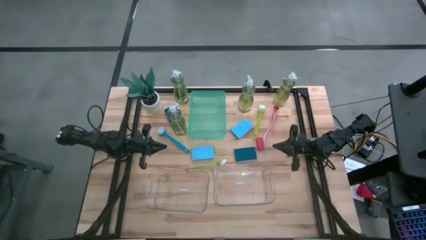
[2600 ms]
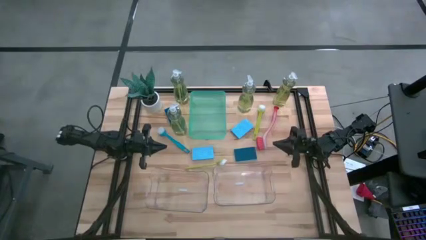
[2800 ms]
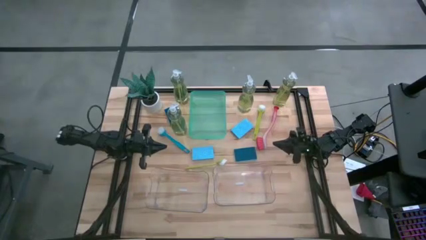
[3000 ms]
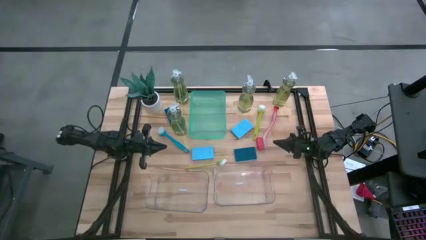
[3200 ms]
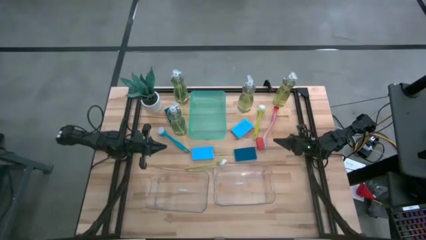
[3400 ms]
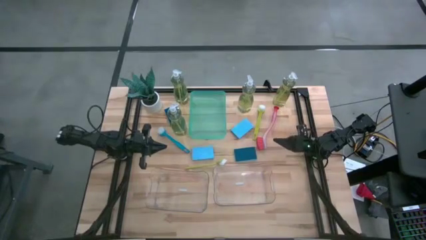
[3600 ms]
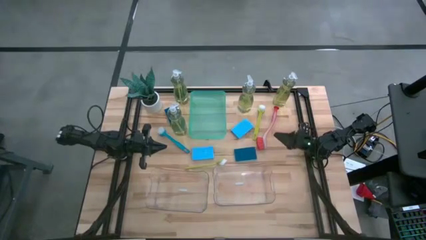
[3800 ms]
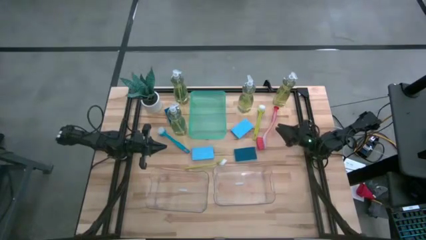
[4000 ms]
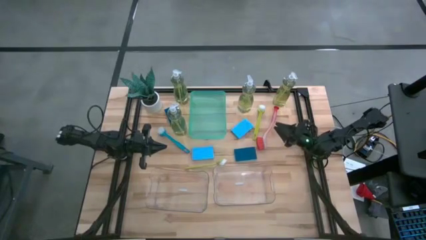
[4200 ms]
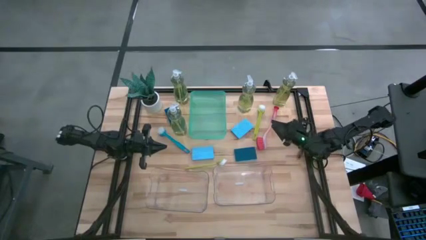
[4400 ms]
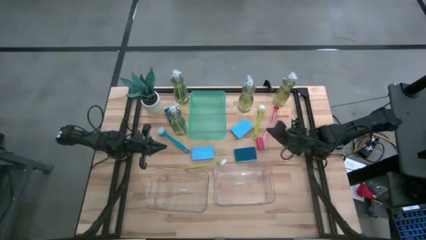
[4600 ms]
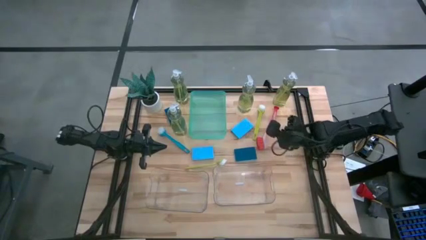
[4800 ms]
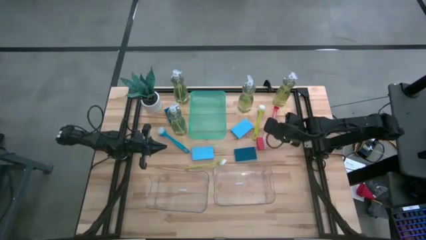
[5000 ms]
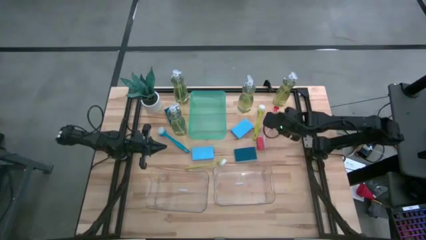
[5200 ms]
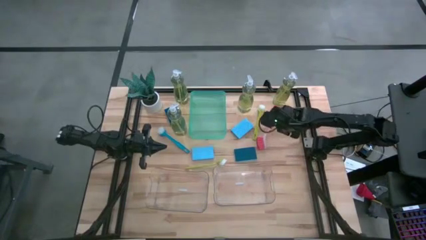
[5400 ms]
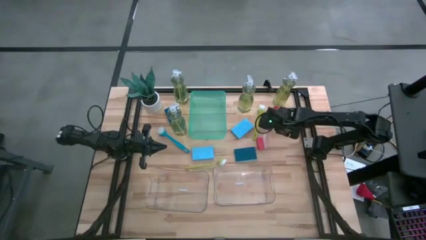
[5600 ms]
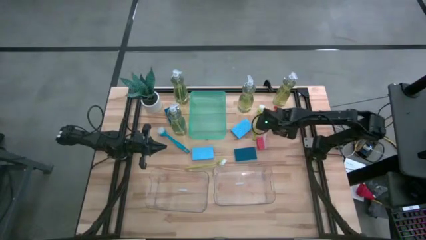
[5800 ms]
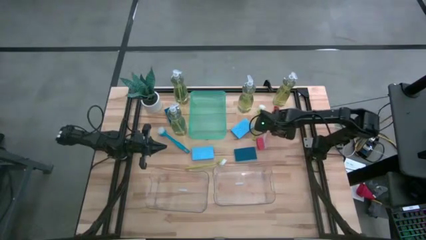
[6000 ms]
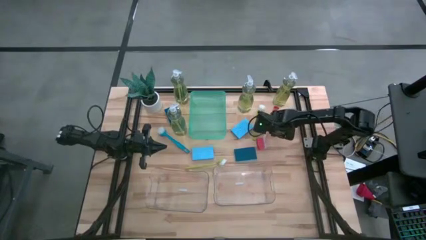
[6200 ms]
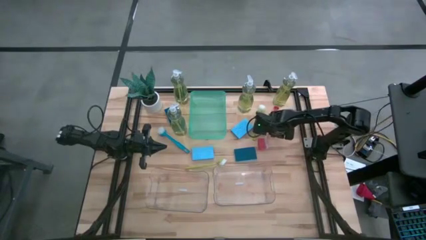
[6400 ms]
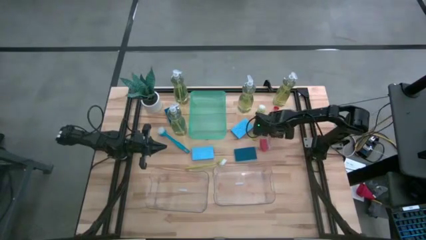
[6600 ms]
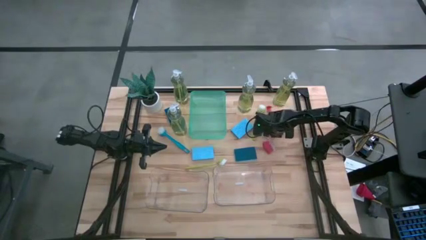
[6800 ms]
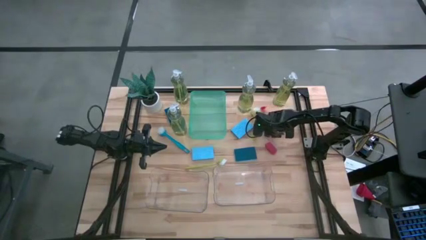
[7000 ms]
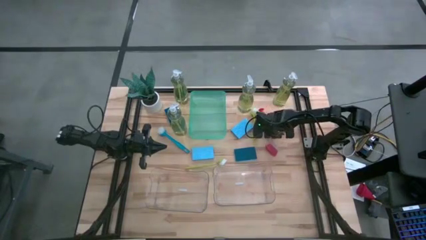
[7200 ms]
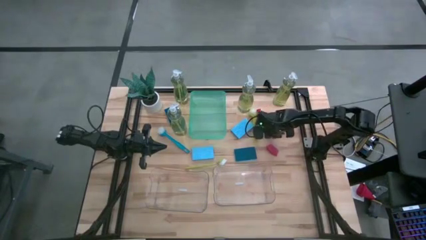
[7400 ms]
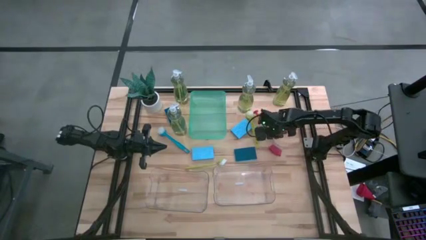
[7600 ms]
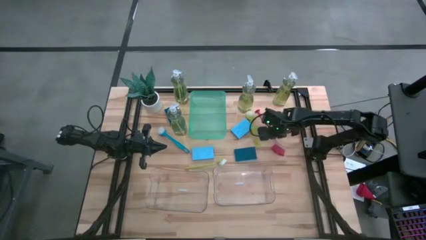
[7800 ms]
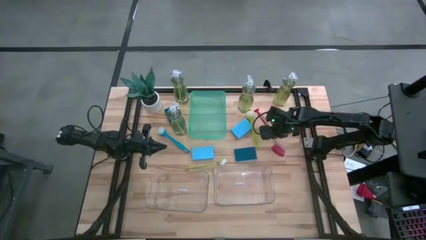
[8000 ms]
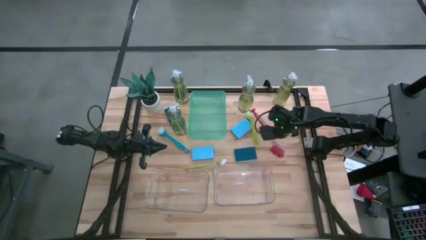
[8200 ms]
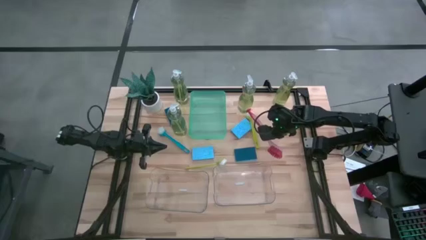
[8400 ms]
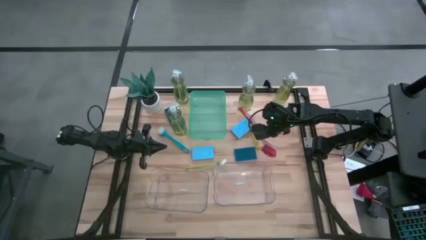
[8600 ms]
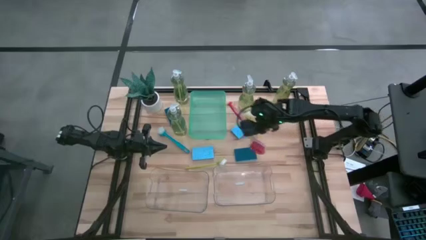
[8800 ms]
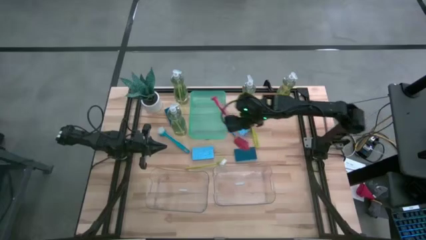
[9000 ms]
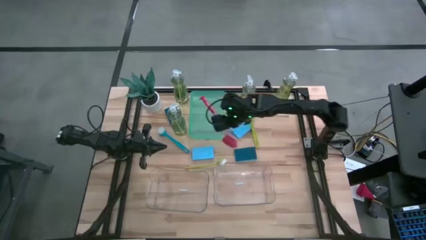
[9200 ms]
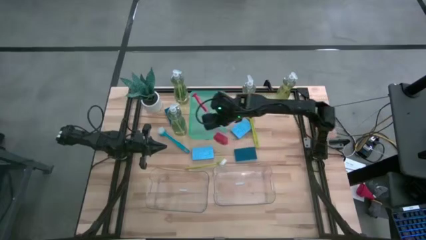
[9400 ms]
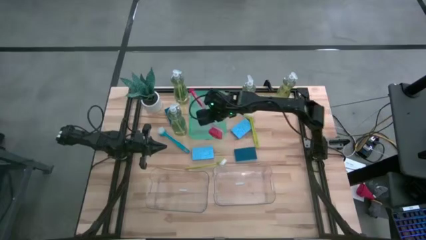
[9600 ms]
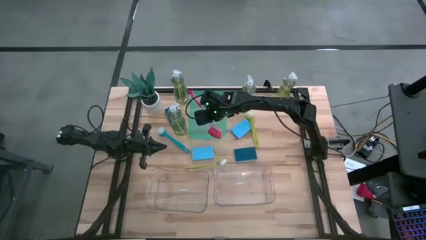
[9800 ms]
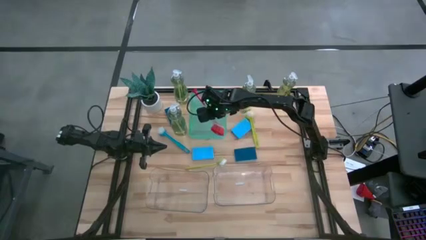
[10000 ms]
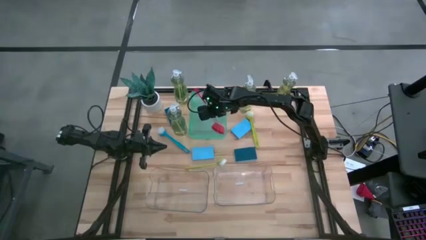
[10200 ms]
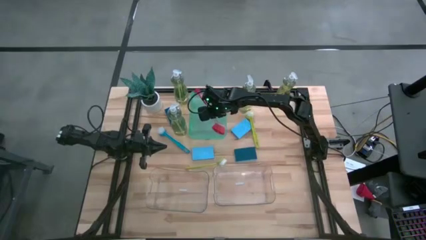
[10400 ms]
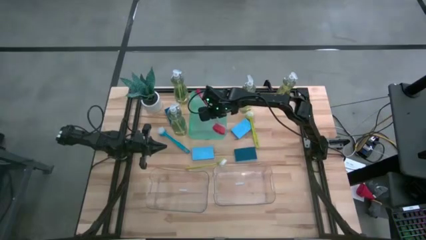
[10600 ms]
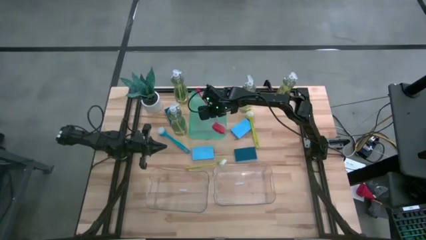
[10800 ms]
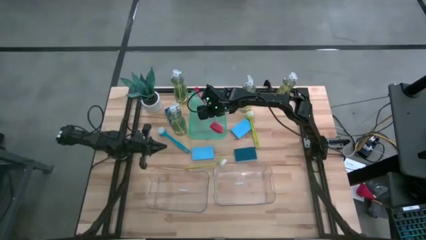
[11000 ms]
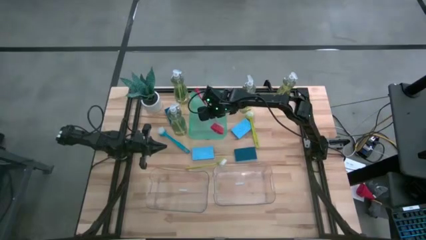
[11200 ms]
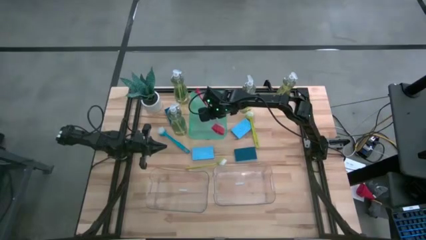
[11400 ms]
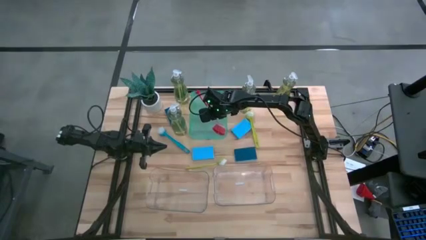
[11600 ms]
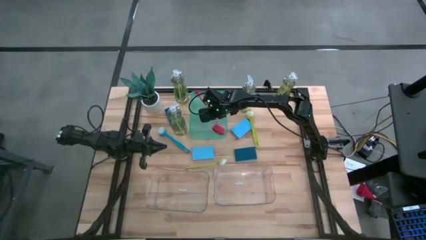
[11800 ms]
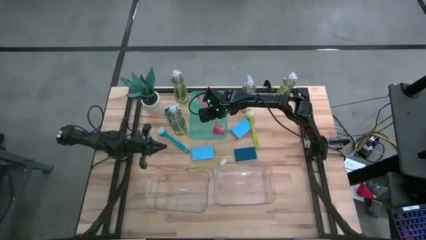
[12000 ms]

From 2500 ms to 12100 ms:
Task: Pick & Place Kitchen Sink Supplies
Put the red dish brush into the green bin

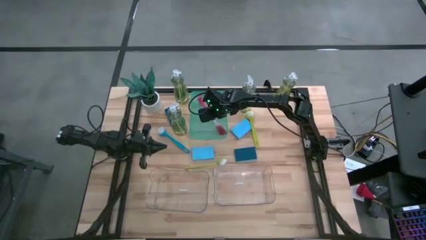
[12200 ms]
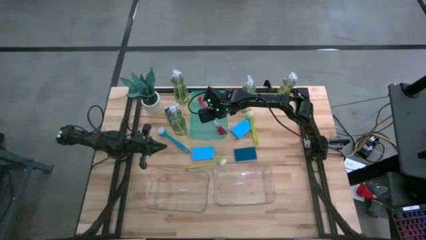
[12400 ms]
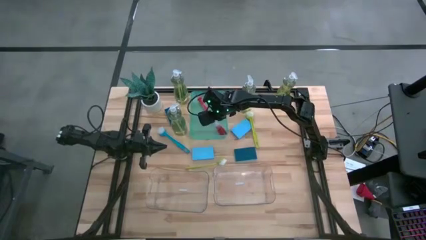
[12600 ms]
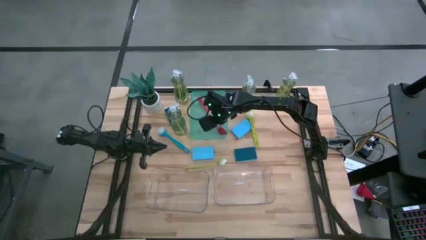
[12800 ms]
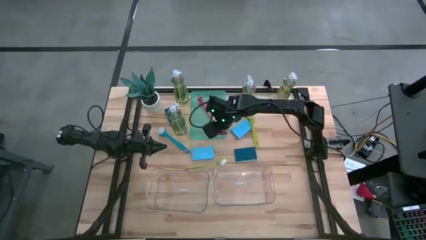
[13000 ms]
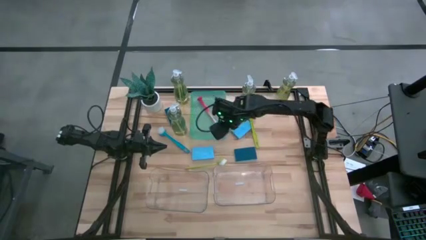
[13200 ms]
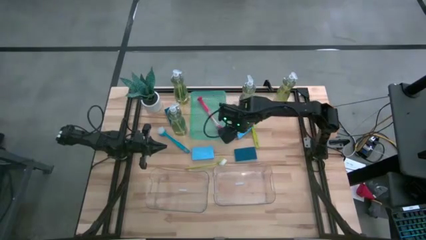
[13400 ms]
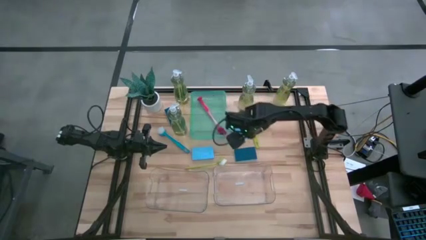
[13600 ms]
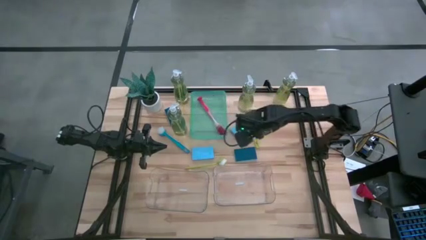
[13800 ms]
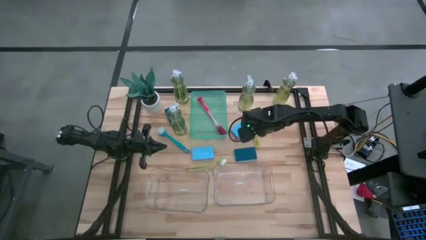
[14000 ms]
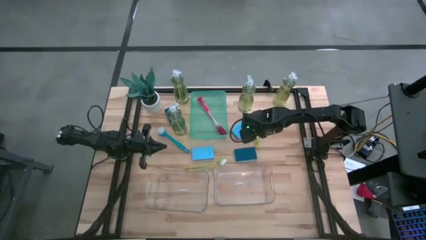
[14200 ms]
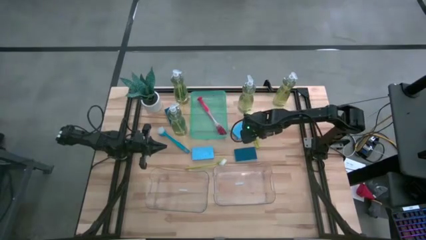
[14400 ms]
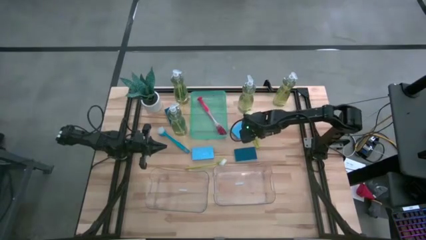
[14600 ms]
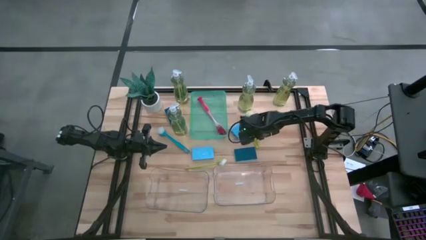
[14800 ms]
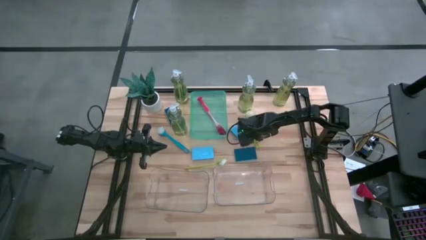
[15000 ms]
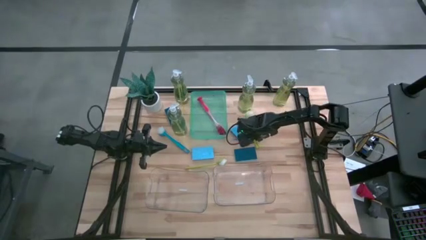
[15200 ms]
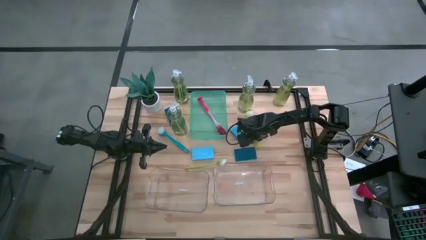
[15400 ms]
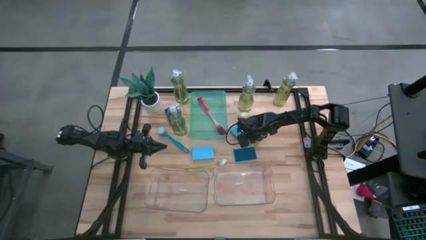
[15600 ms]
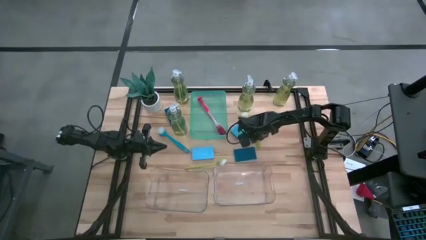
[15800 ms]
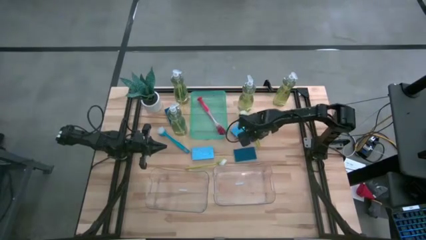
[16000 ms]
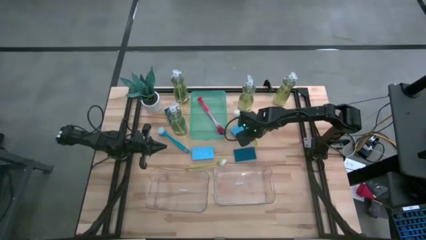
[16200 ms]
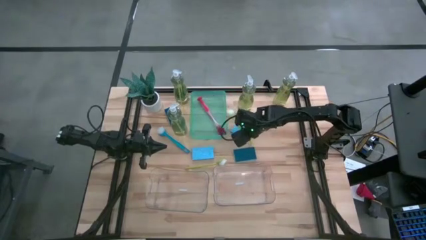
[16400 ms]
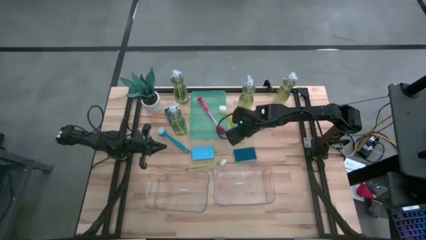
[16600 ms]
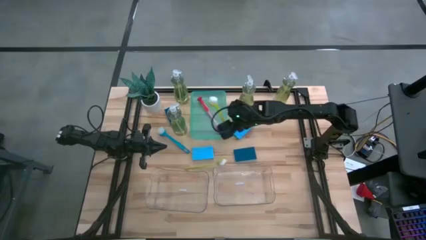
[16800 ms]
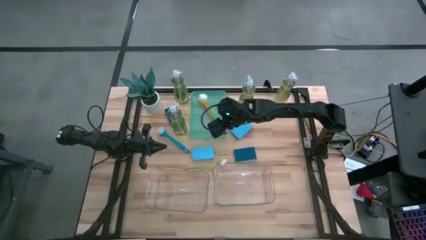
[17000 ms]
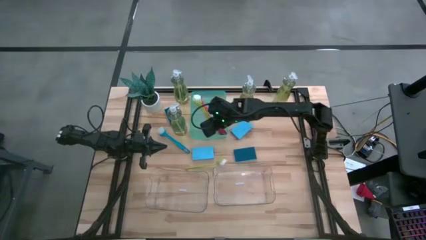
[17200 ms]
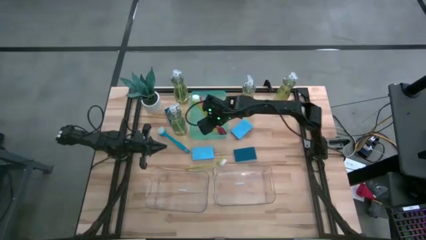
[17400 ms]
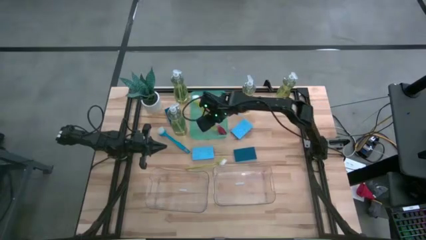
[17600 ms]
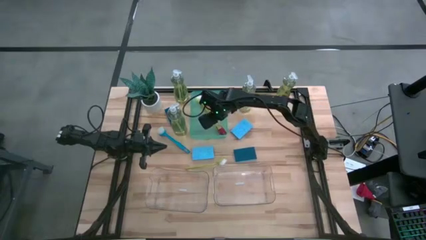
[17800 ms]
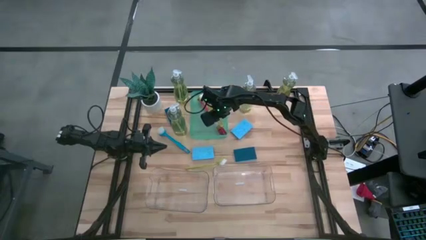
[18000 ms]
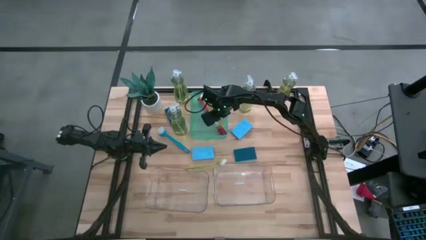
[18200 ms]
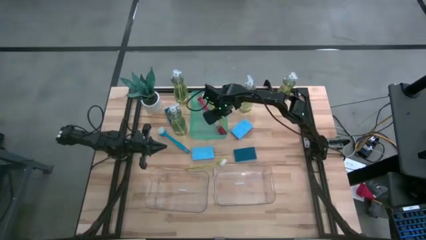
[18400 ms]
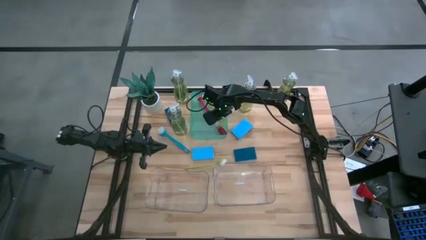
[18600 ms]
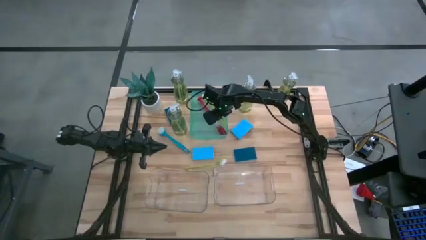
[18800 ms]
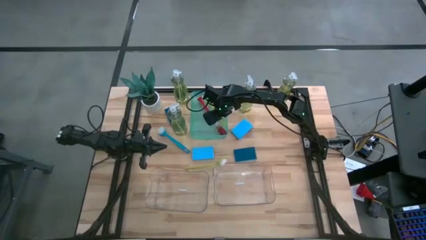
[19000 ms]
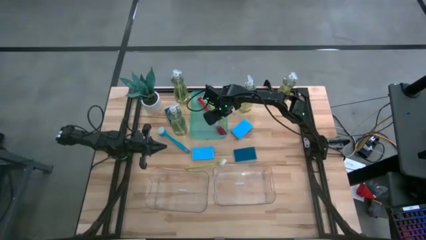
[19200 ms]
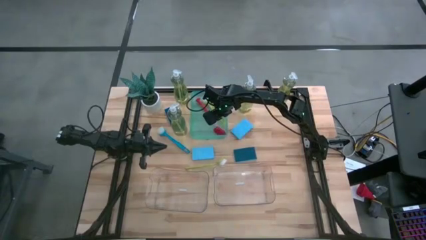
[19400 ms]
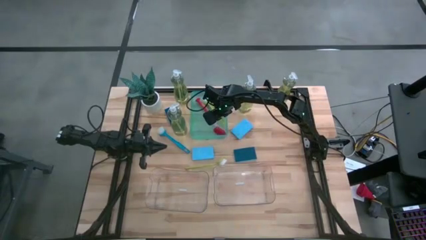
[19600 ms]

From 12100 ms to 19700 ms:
Put the green dish brush into the green bin
